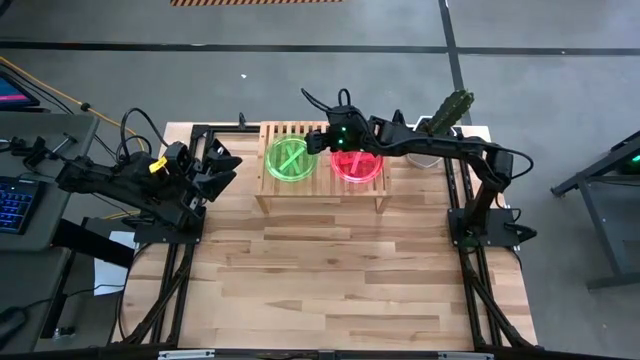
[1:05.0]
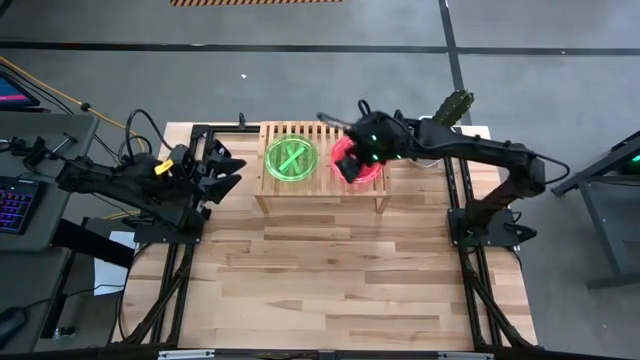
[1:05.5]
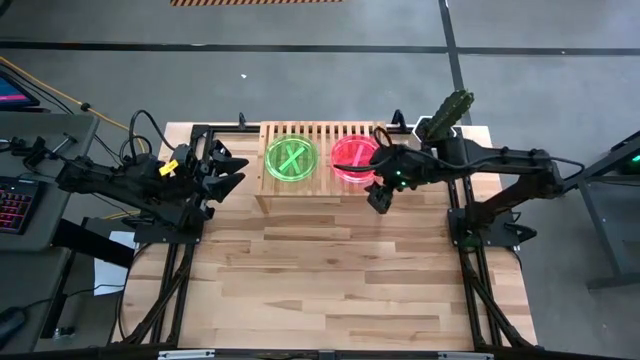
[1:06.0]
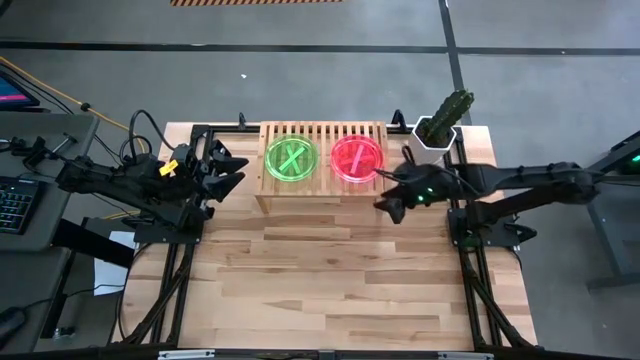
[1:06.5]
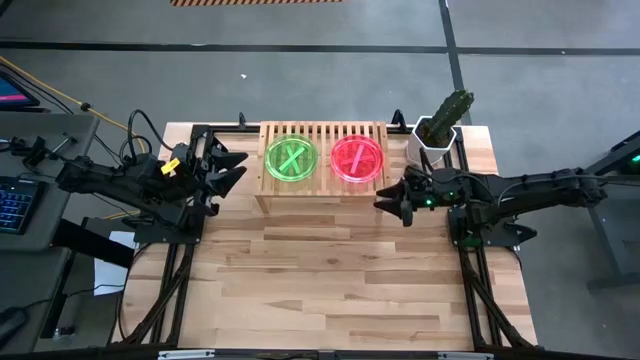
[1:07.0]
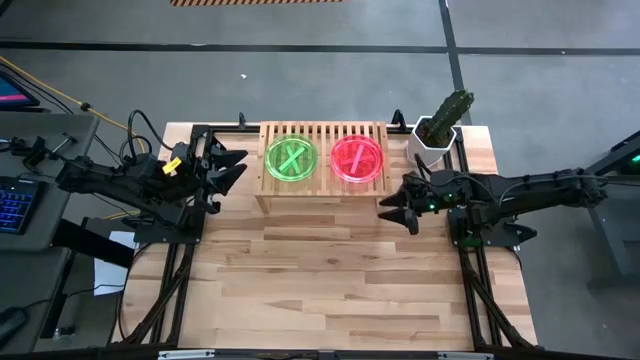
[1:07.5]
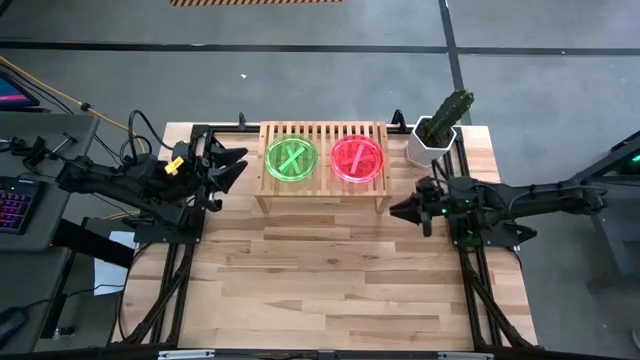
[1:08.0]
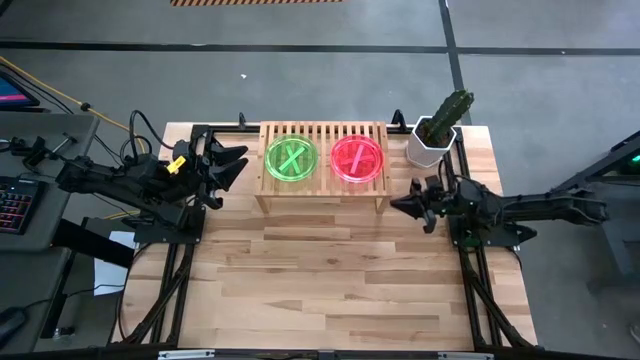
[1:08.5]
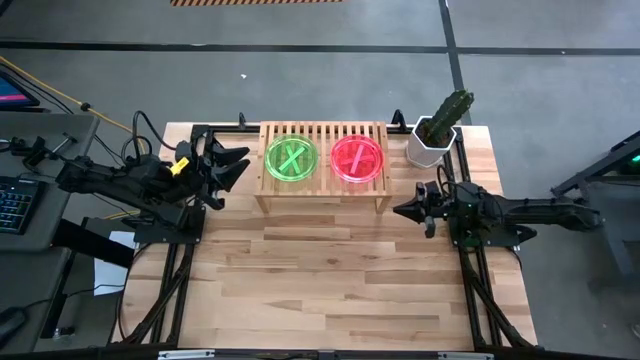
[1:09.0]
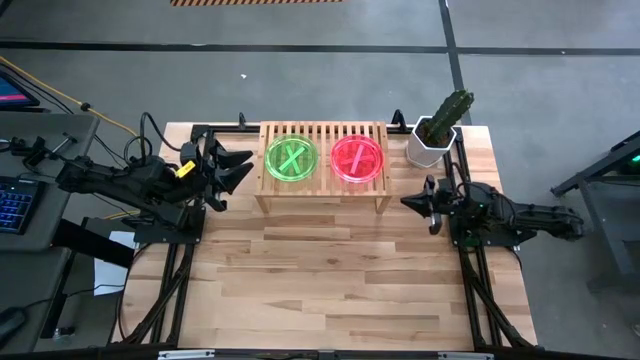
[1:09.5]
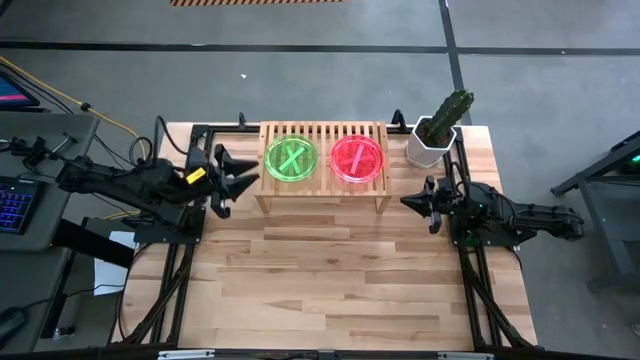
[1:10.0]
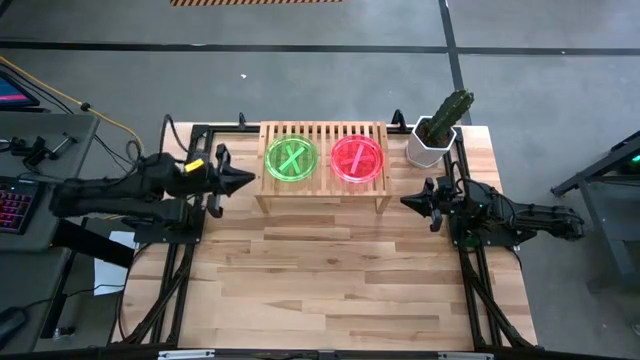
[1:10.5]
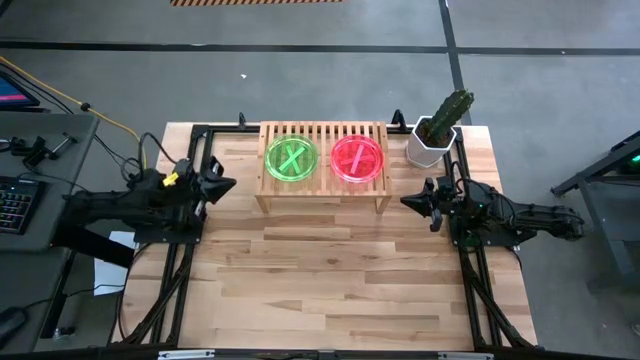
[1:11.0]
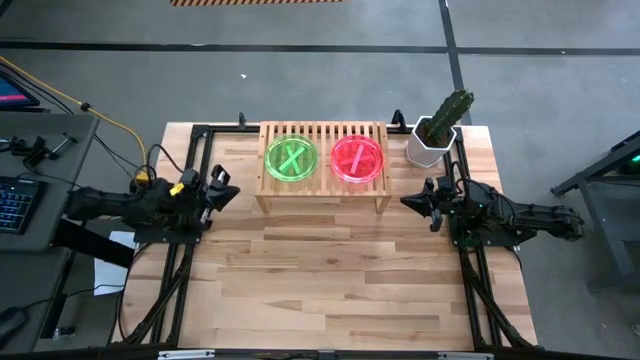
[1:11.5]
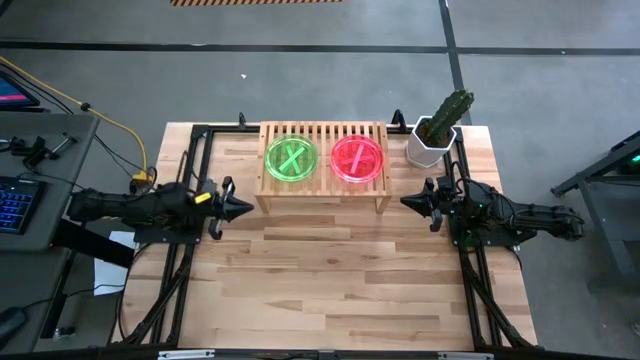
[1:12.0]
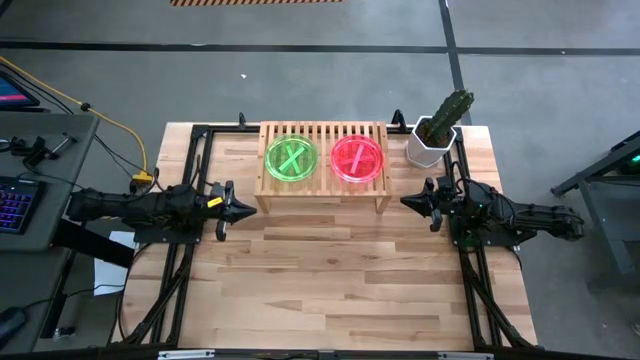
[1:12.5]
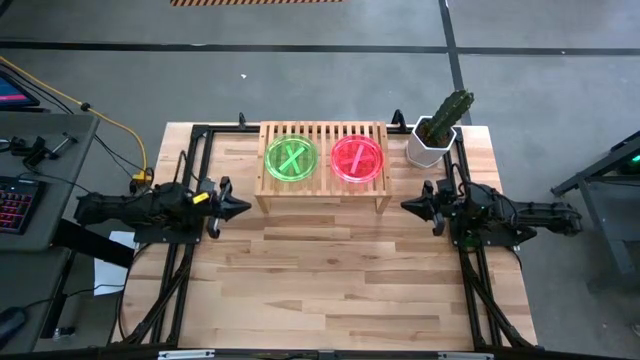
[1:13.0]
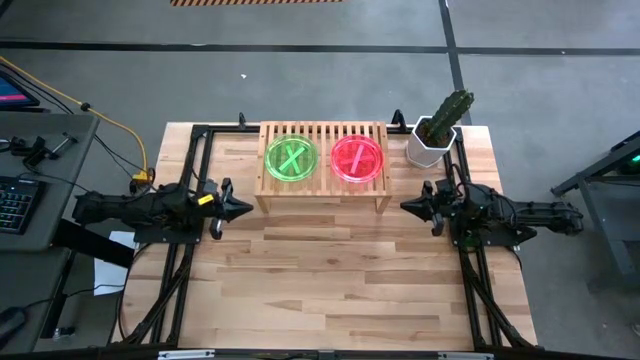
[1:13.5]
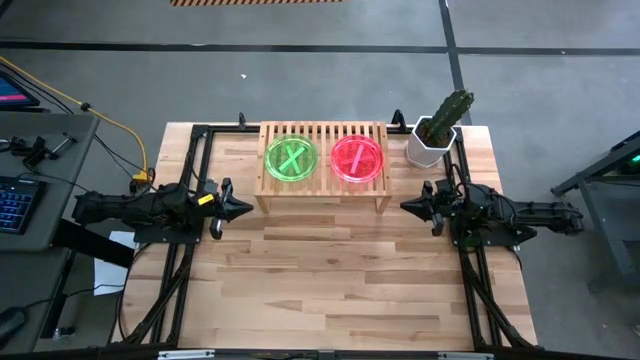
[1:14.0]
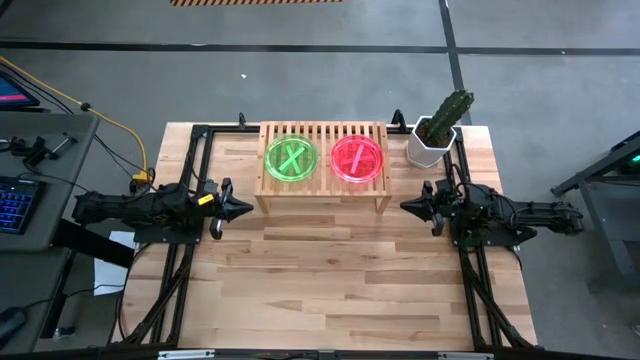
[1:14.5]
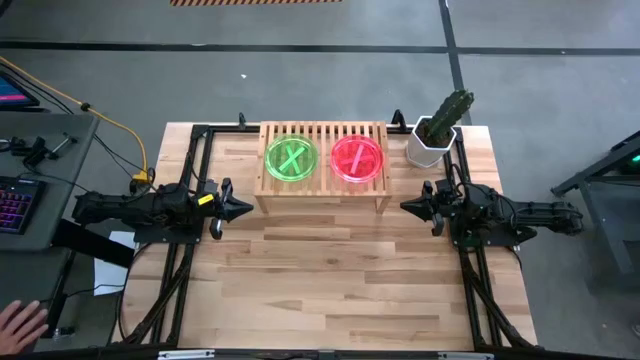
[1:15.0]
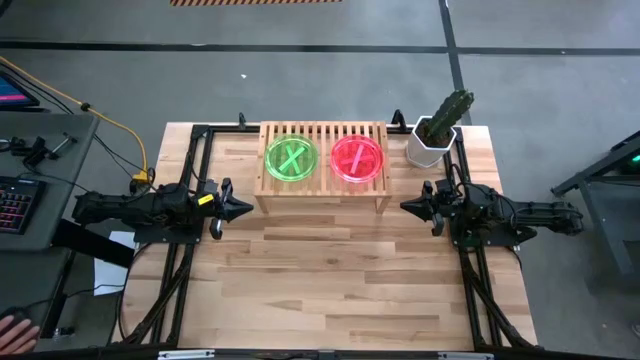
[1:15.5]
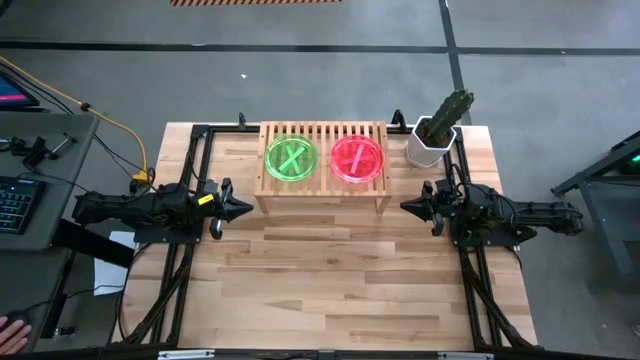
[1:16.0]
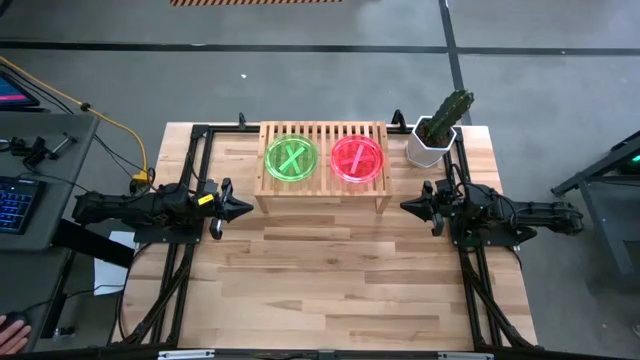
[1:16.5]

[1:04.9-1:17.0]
Task: Place and stack plates onto a shelf
Return to Home Position

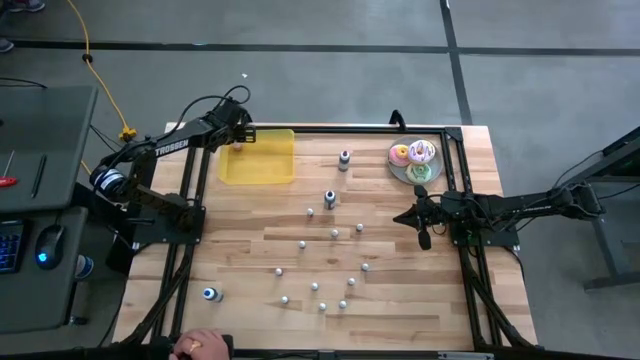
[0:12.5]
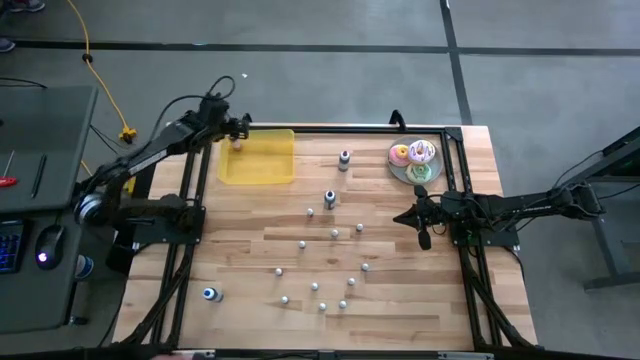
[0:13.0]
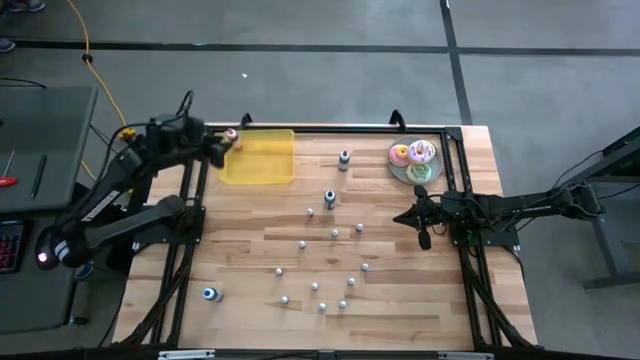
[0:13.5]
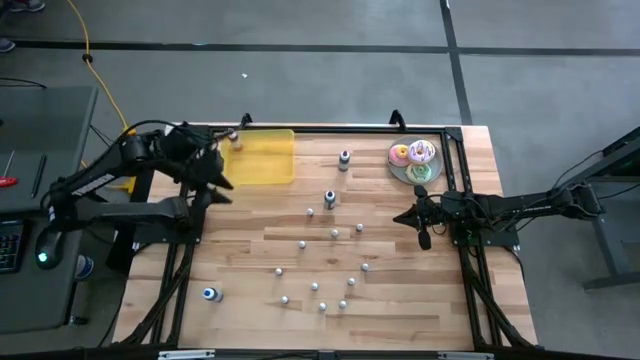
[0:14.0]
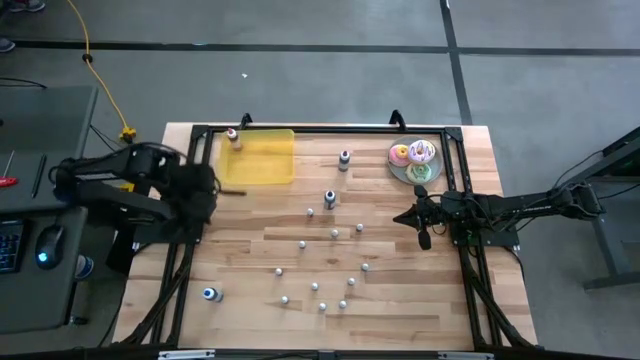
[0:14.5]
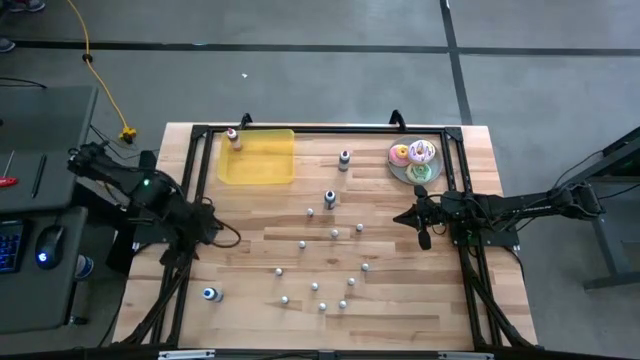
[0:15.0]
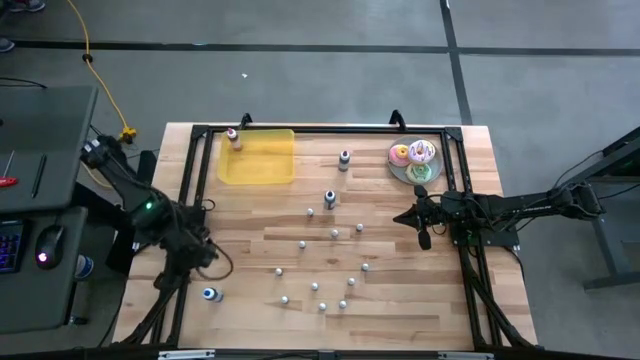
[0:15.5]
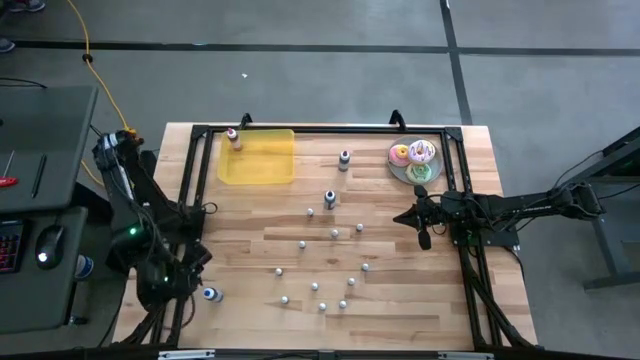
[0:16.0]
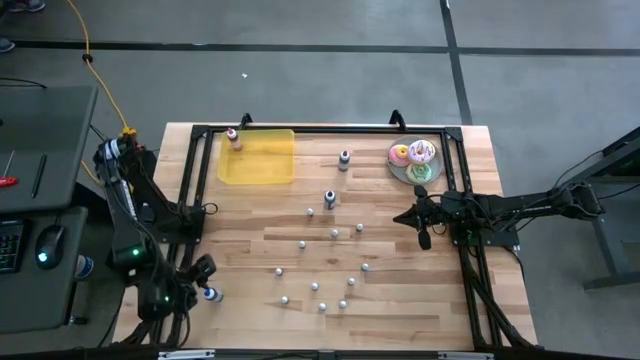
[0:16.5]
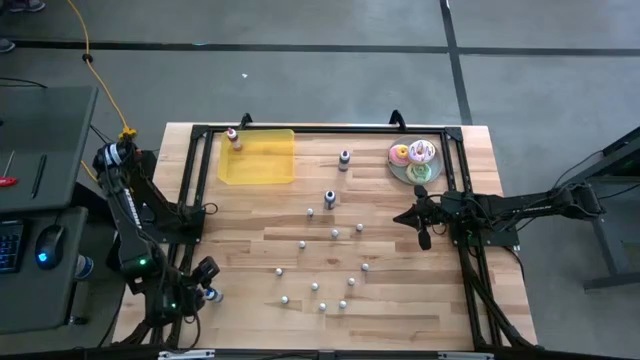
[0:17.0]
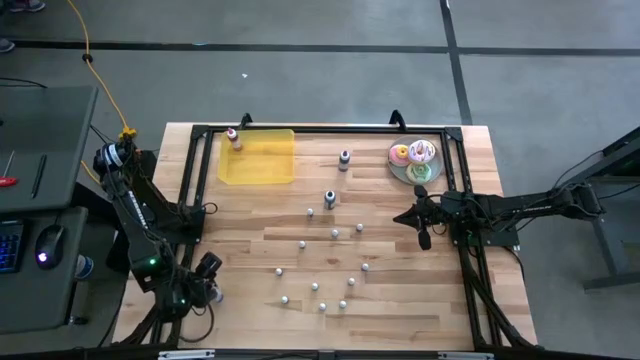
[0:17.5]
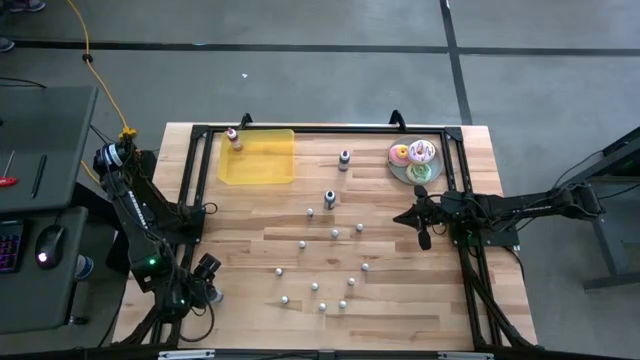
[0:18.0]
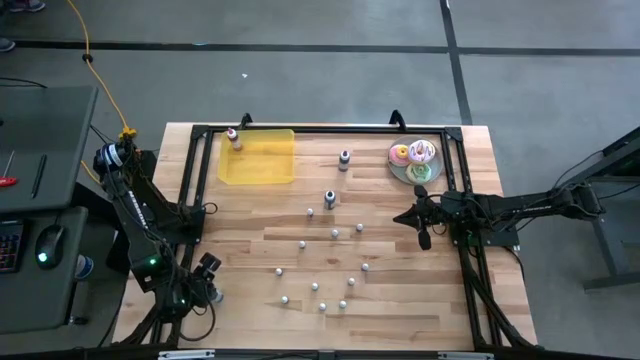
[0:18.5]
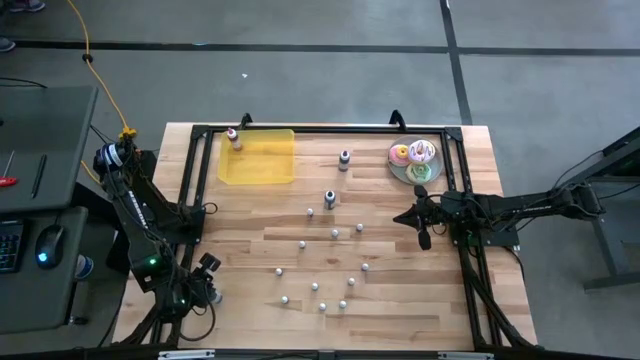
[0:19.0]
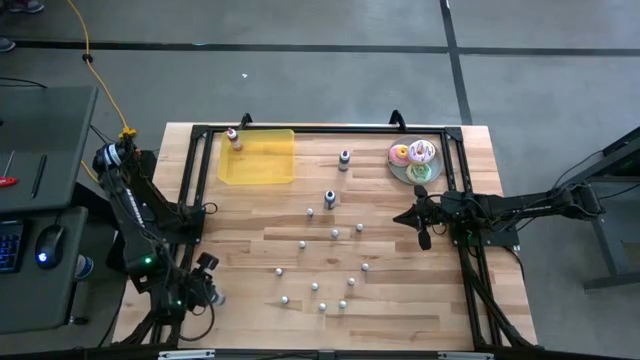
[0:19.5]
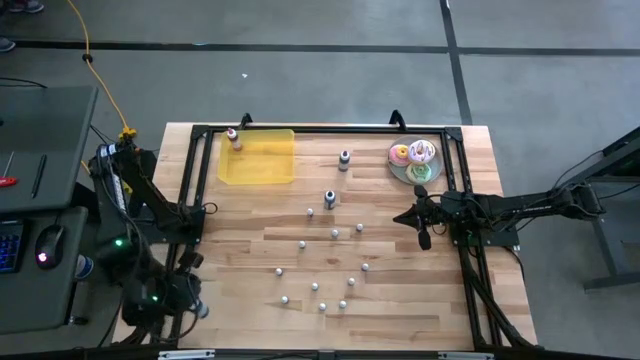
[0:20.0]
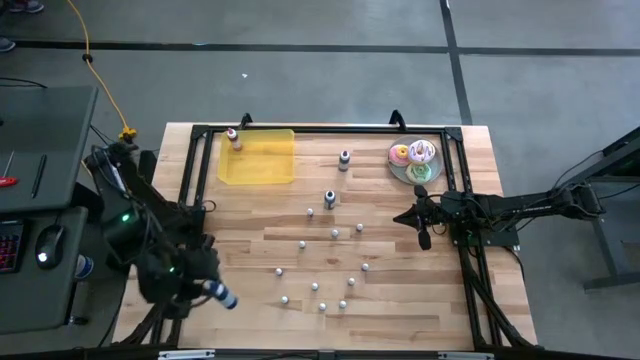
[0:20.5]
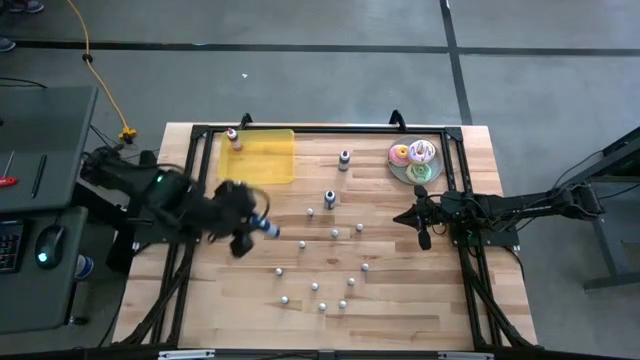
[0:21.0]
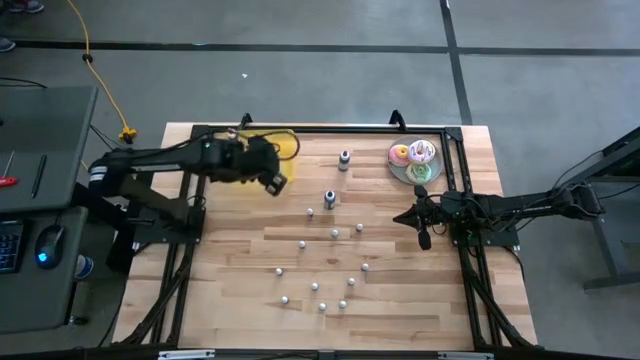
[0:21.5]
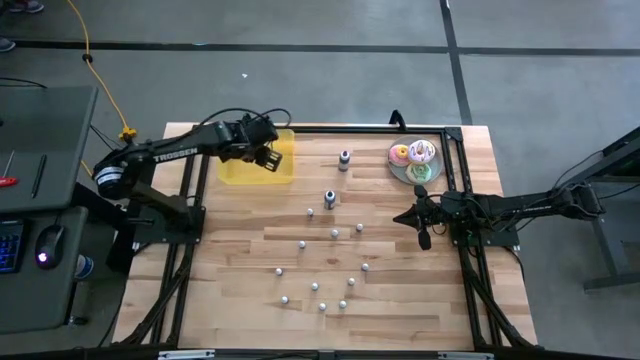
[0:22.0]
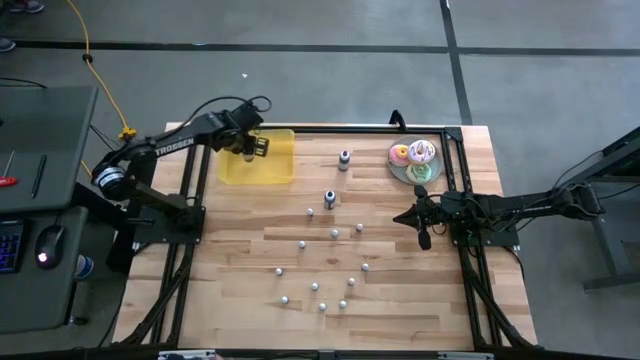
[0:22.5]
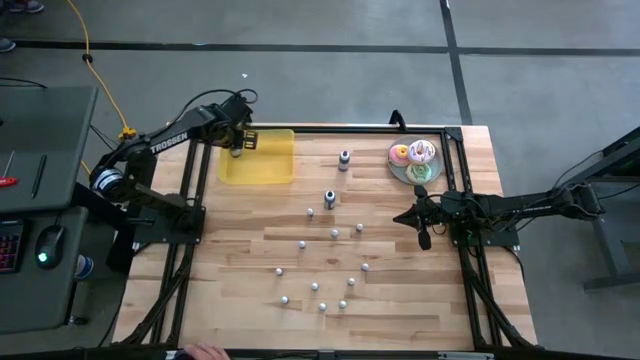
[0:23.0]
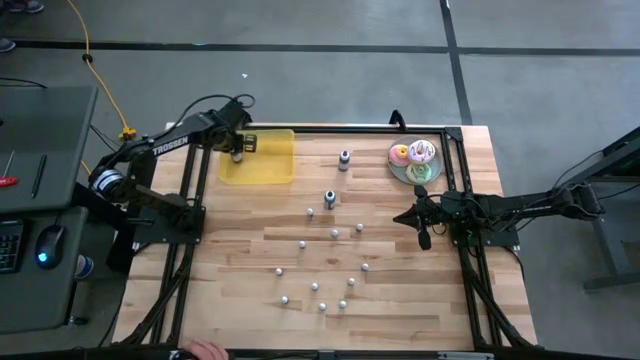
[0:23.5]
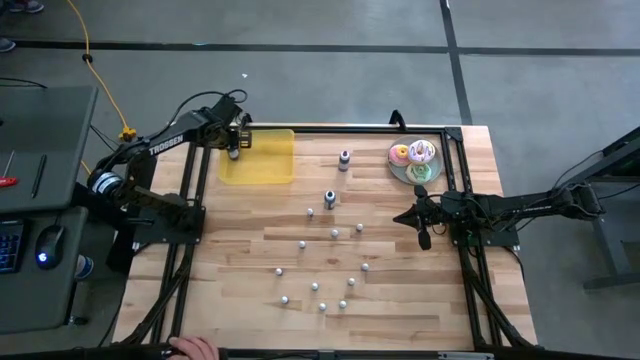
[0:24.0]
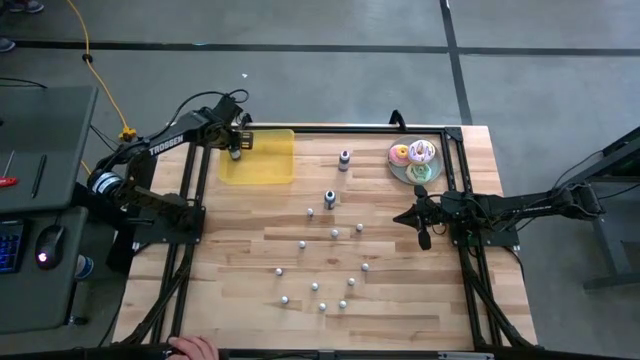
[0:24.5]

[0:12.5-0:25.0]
Task: Pick & Place food coloring
Put the large blue food coloring bottle into the yellow bin
